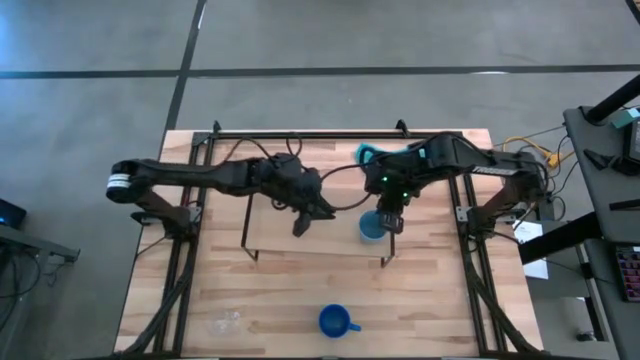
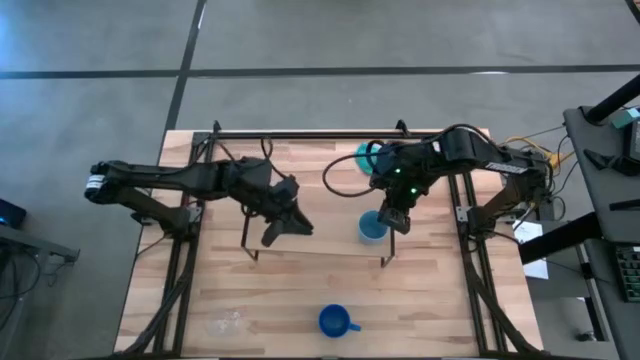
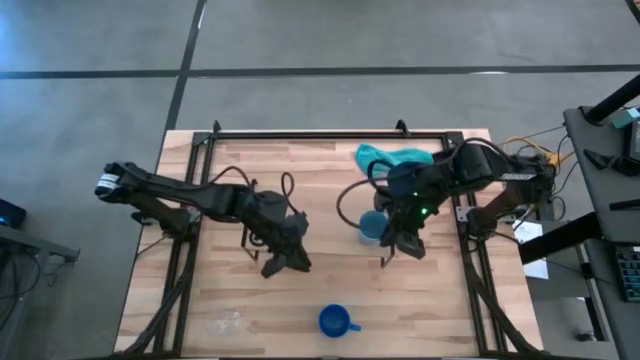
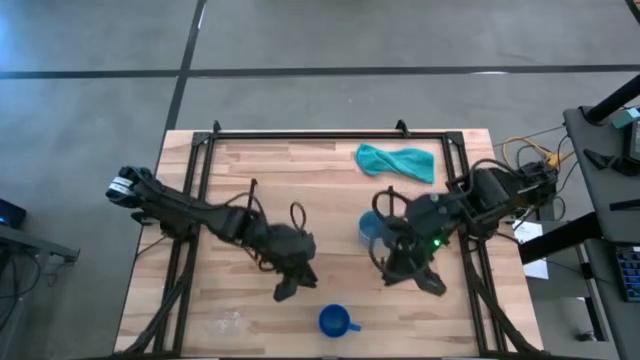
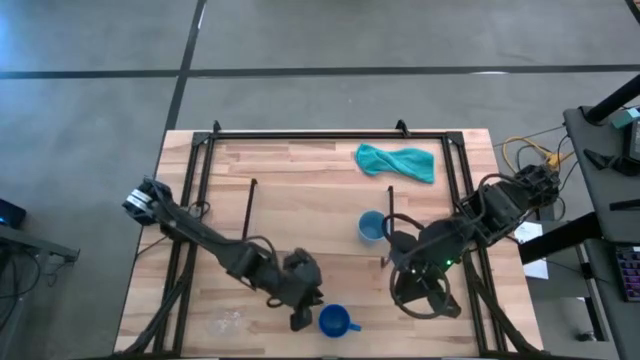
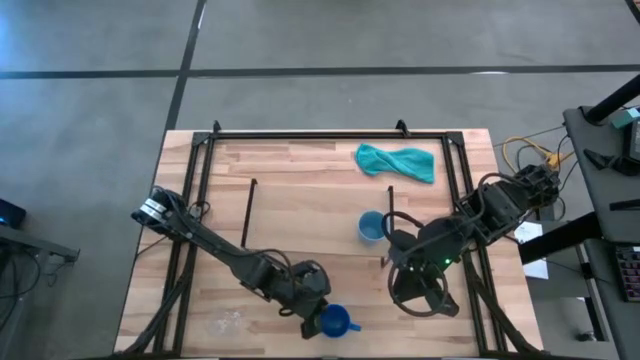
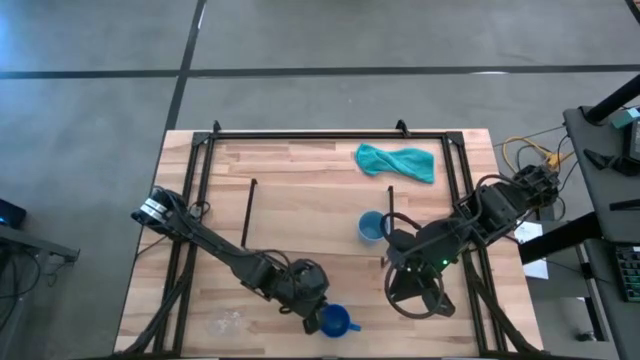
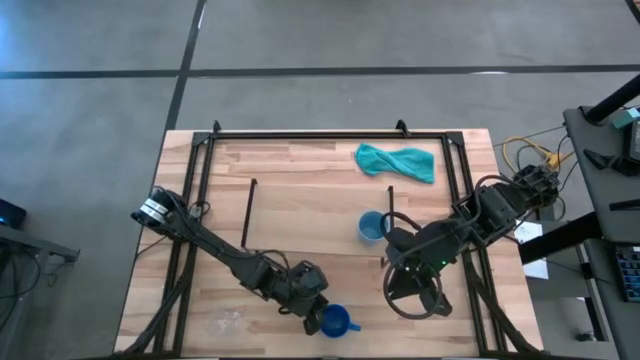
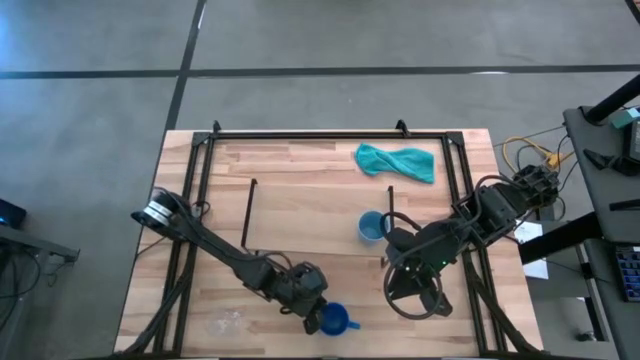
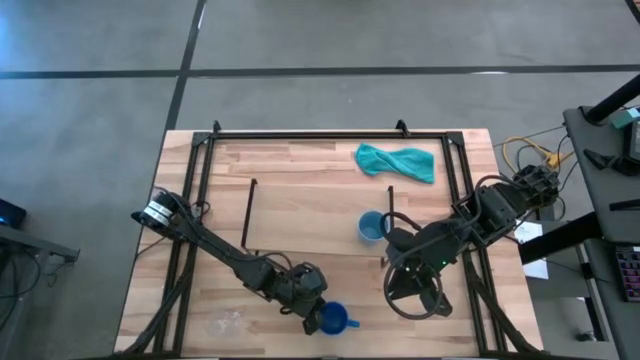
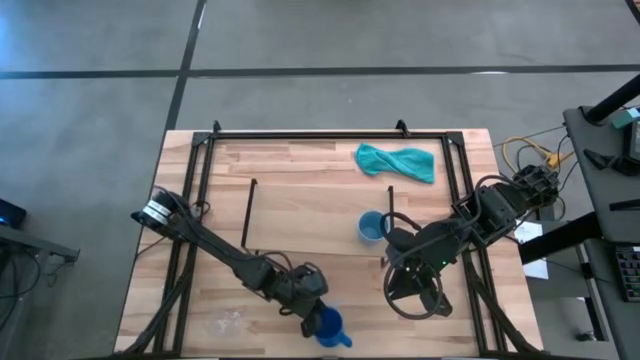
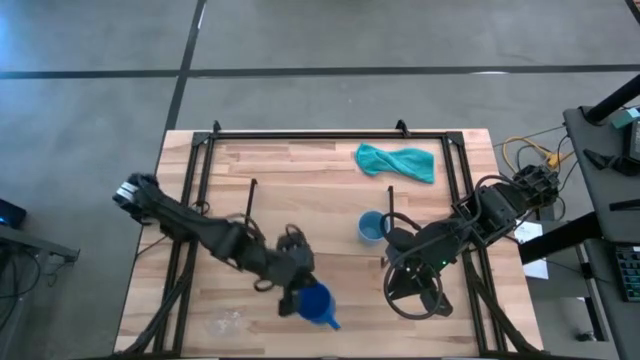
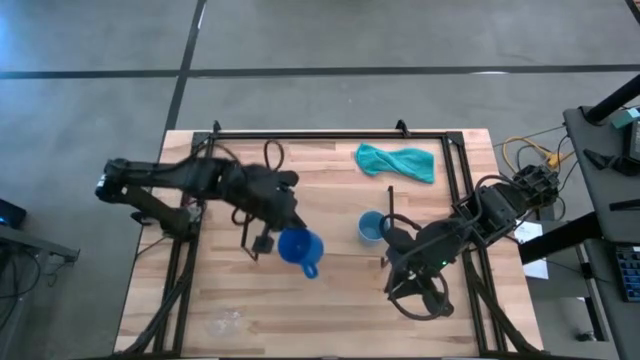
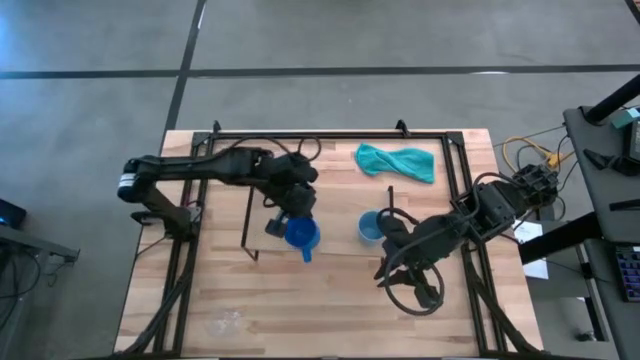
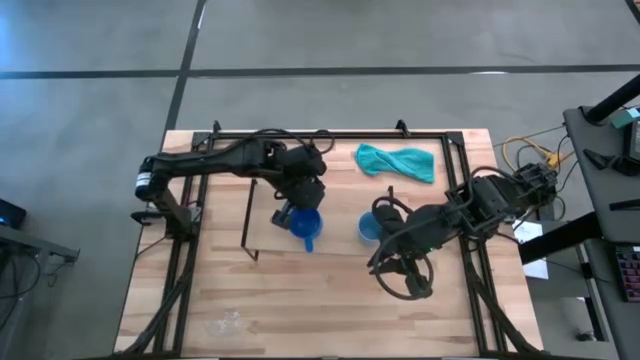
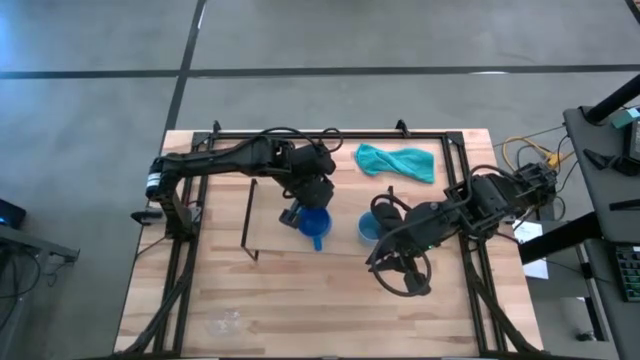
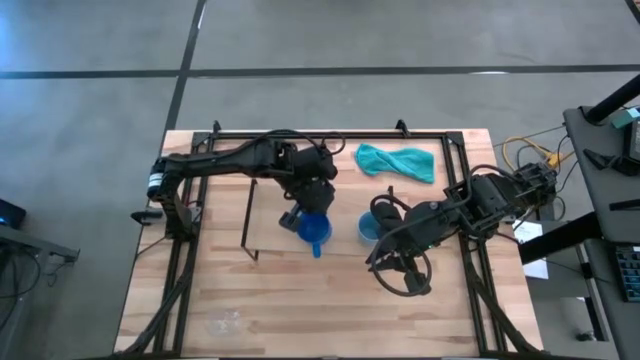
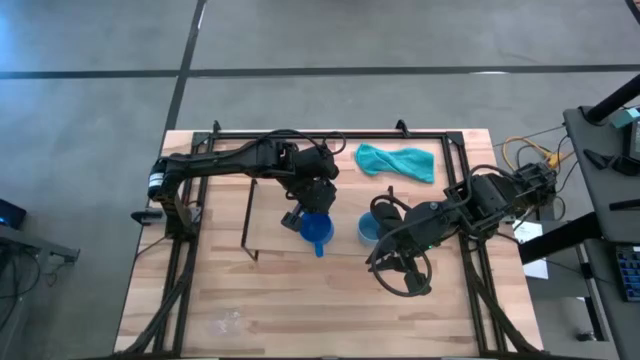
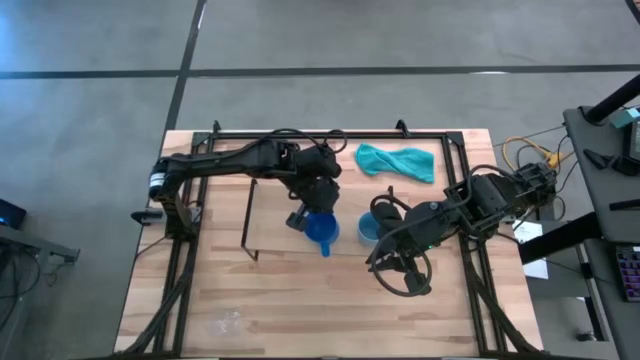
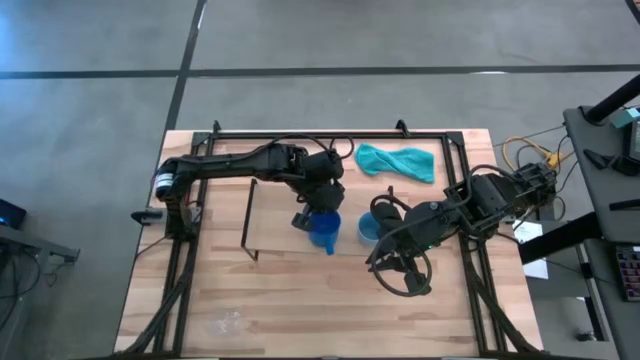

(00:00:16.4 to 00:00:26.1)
Task: Stack small to large cups/mugs on shelf
Put the blue mug on the shelf

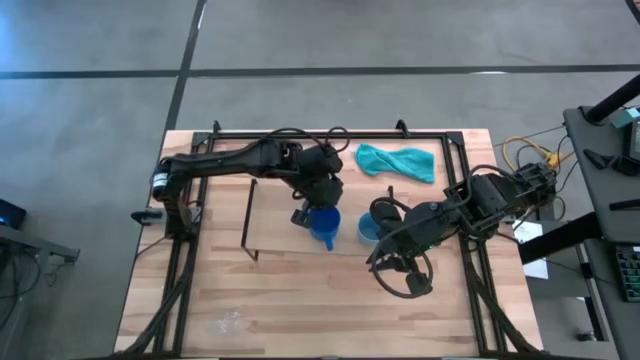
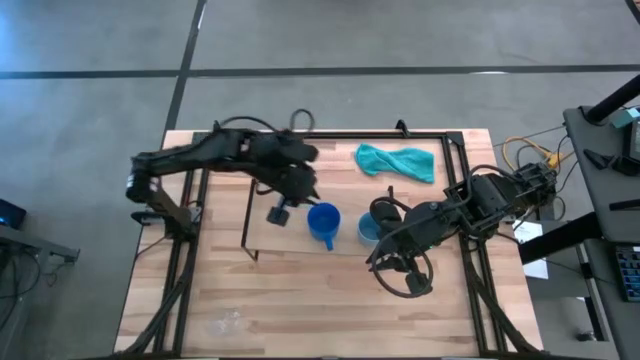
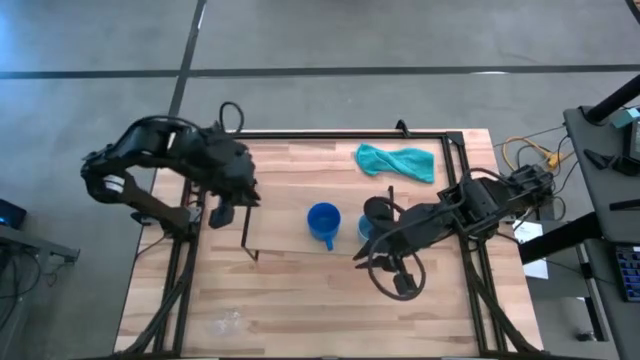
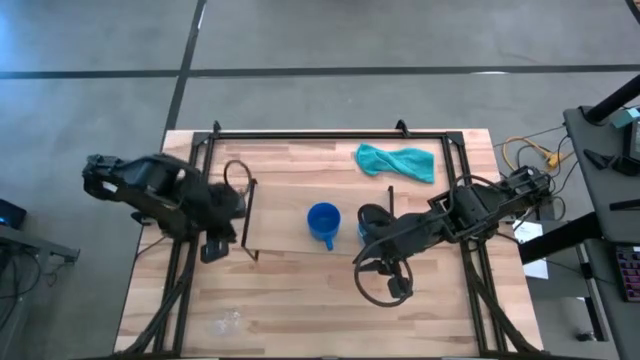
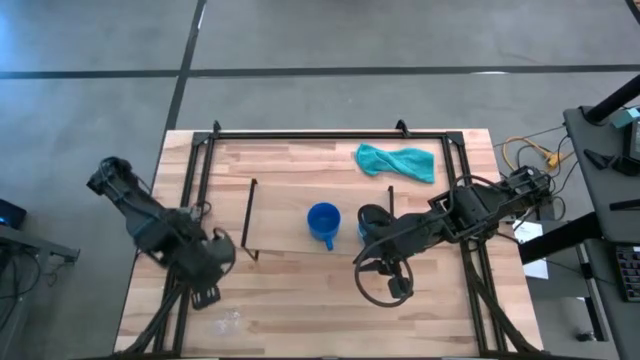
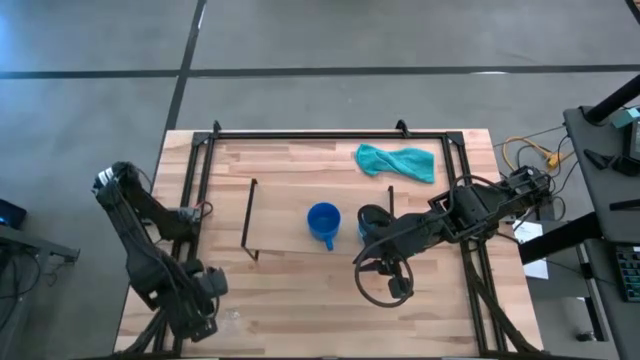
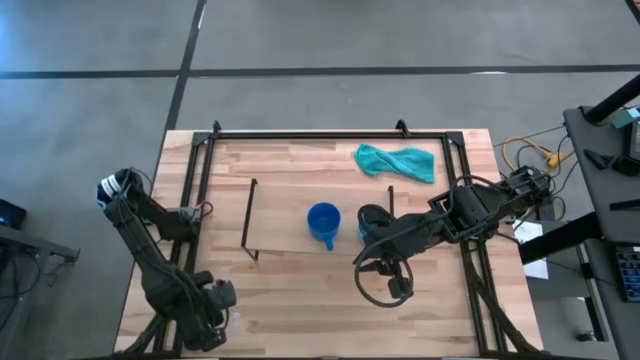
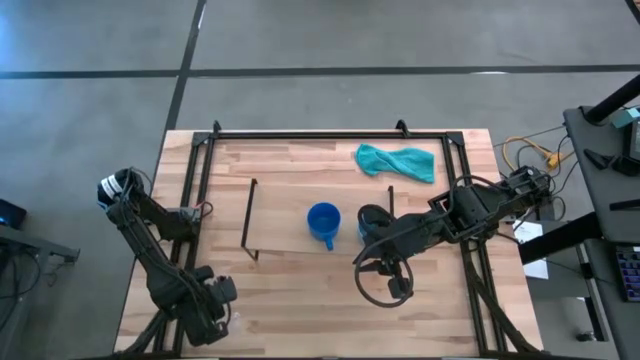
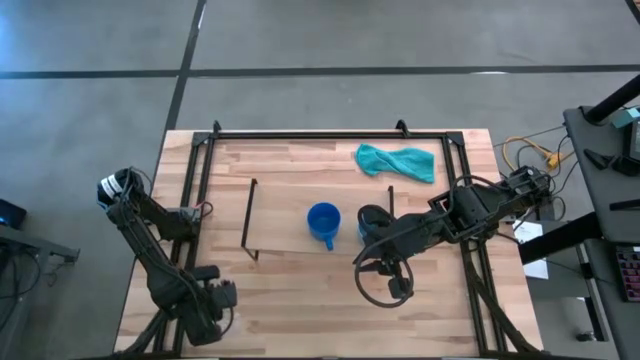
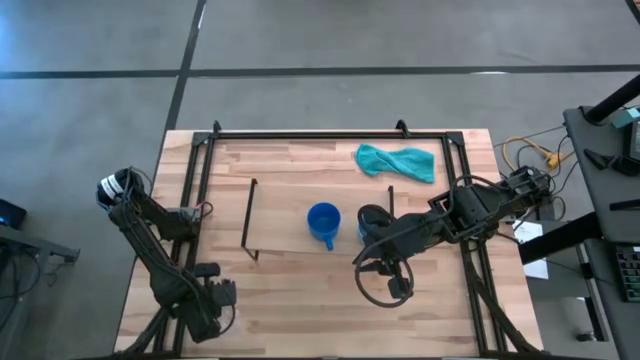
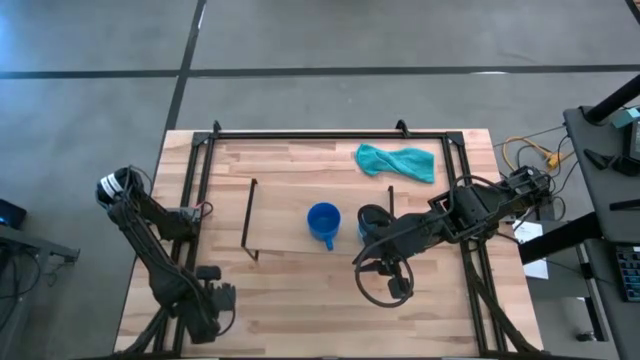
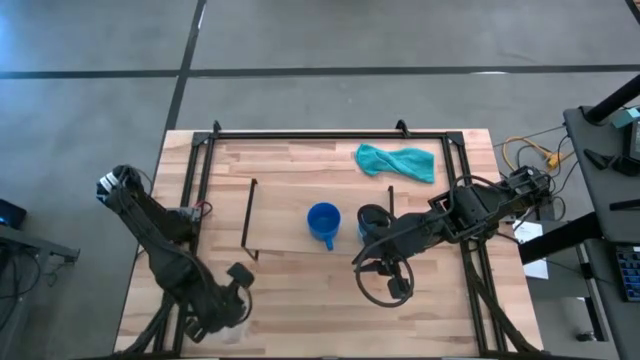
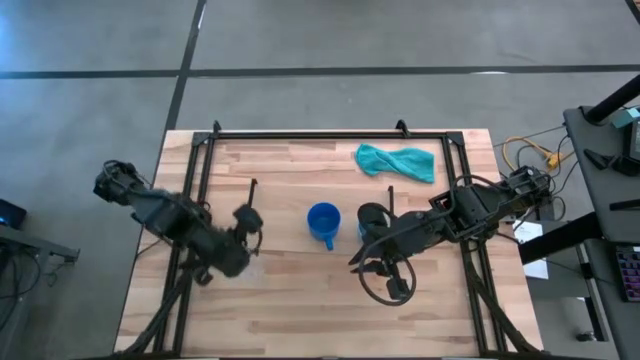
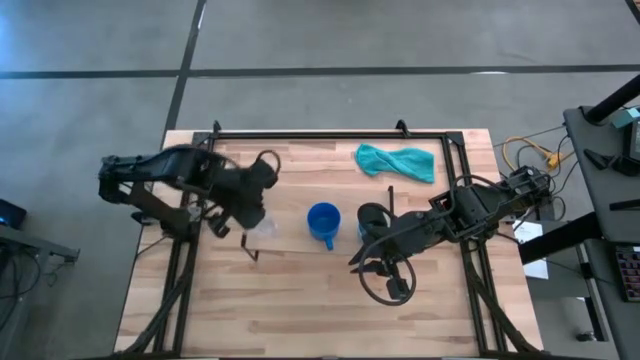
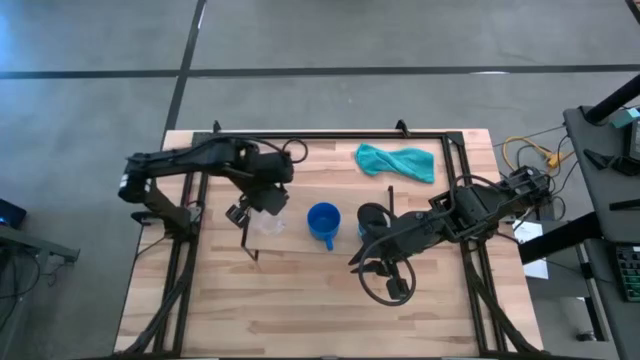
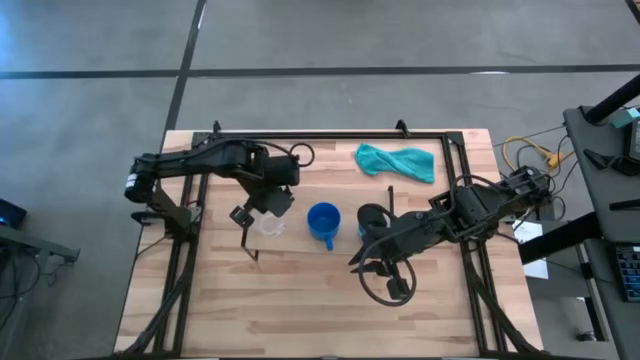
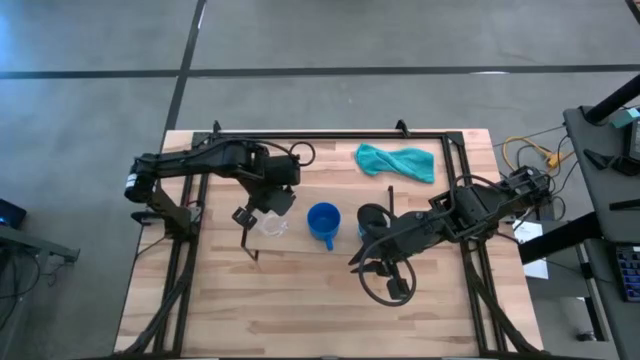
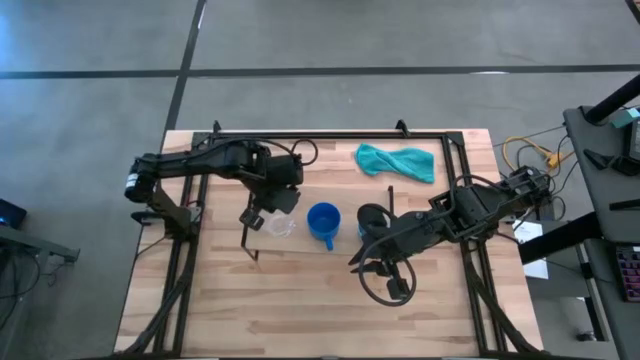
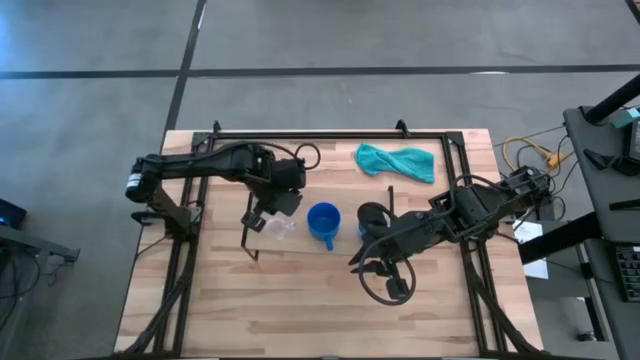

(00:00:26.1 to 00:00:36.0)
Put the transparent mug on the shelf

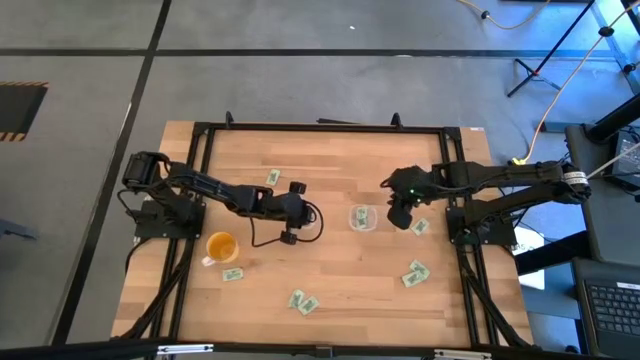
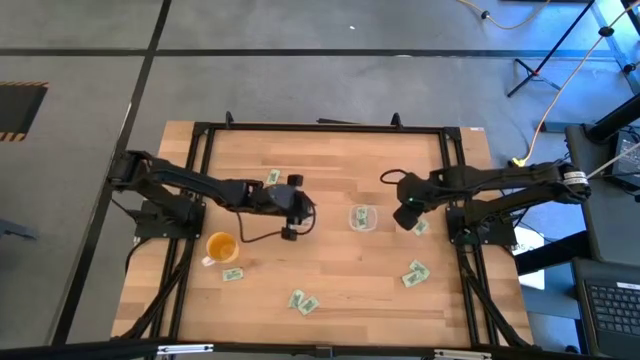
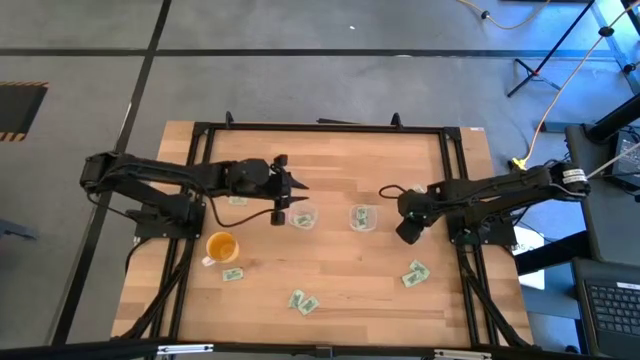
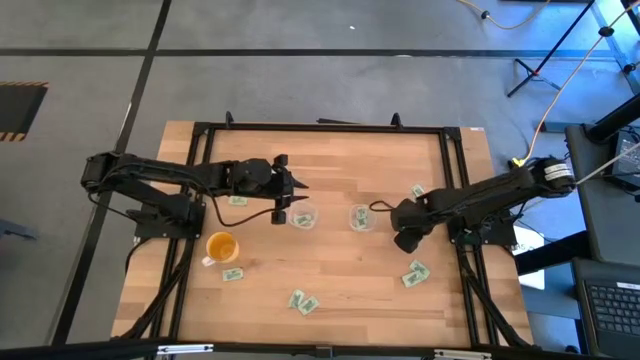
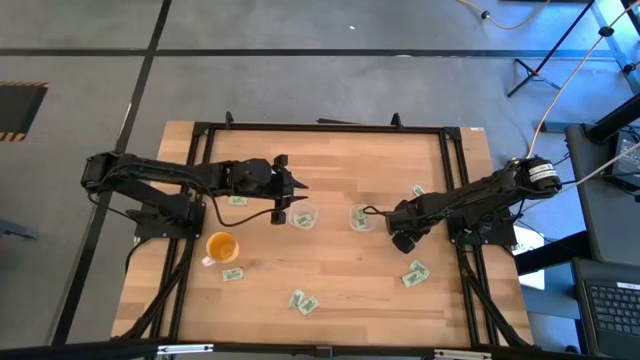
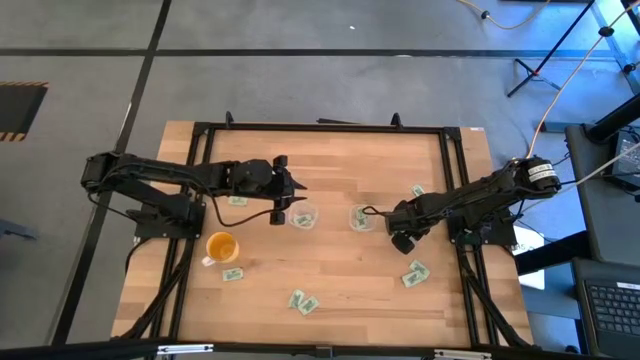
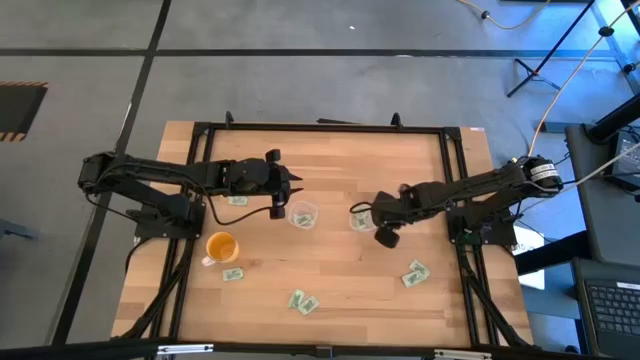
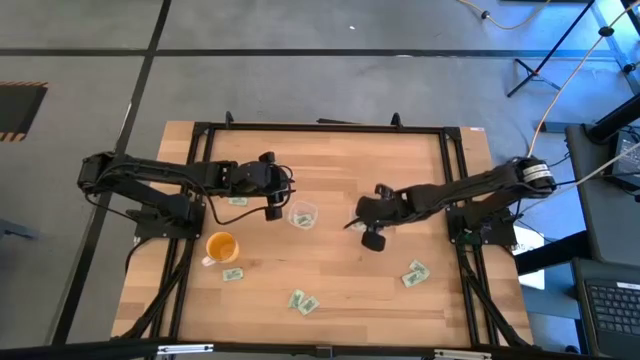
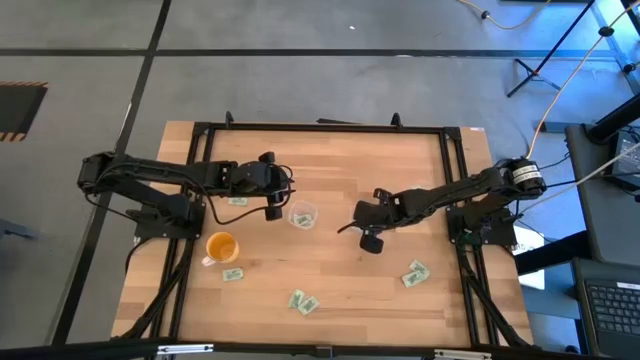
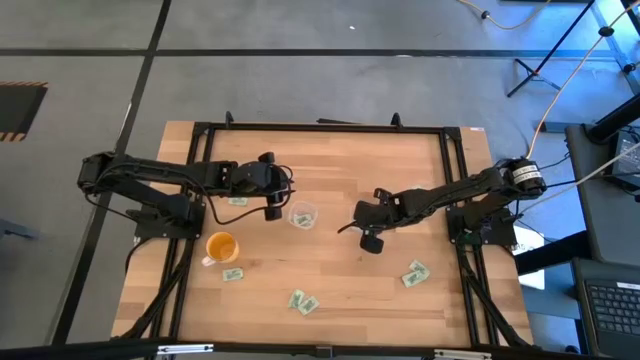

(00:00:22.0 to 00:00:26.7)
Task: Pick and place Stevia / Truvia into bins
Put the stevia packet into the right transparent container
